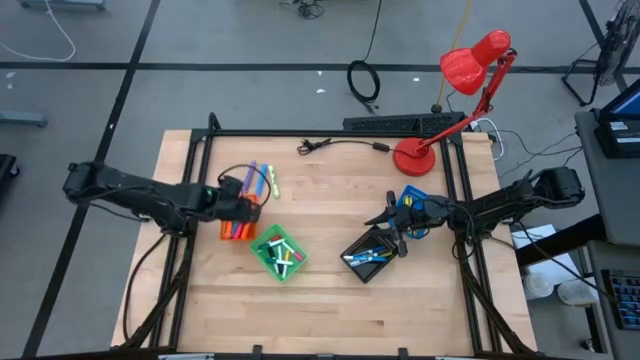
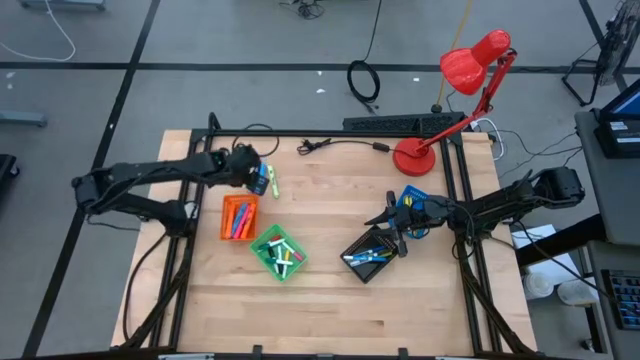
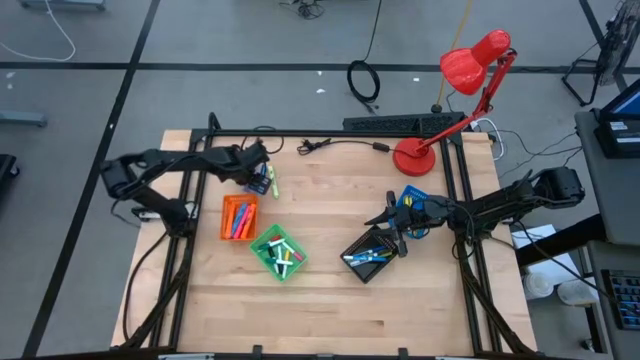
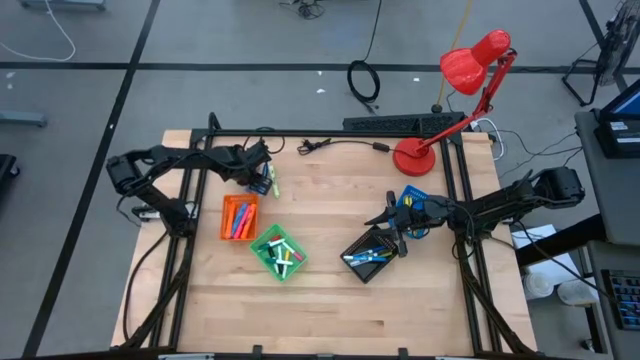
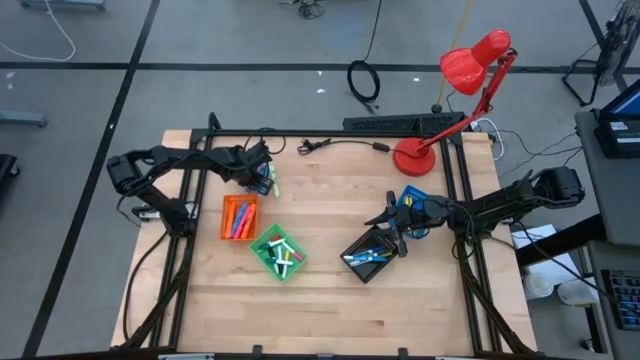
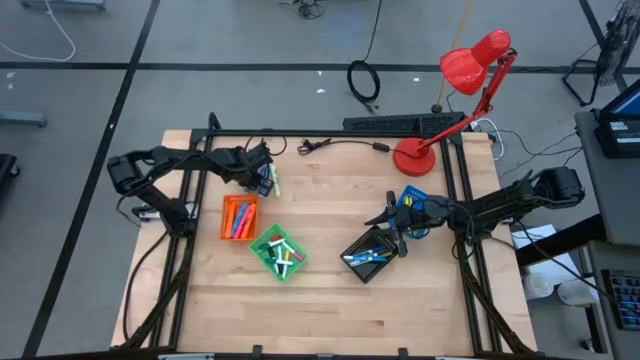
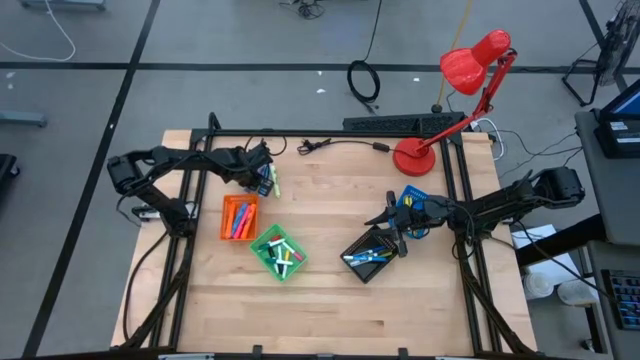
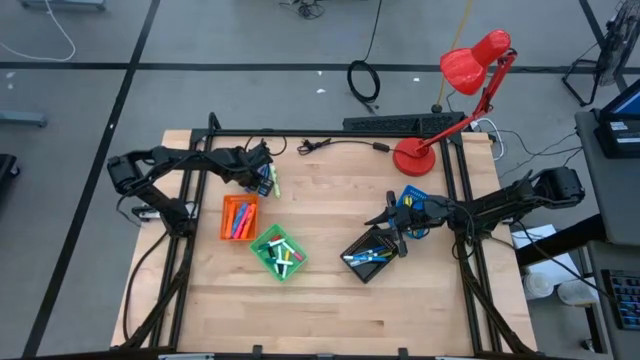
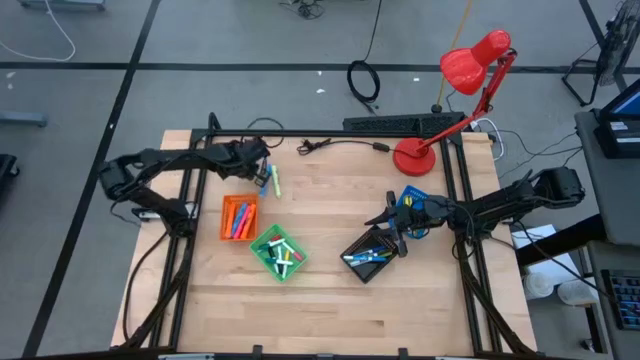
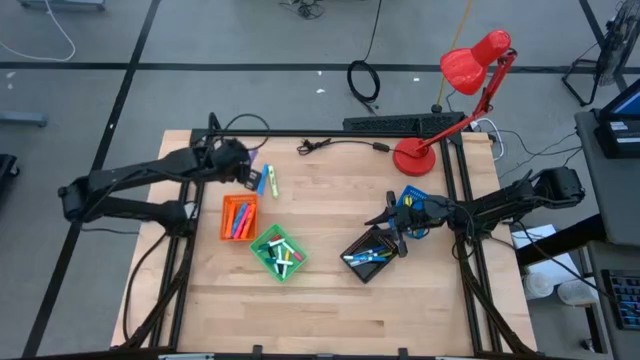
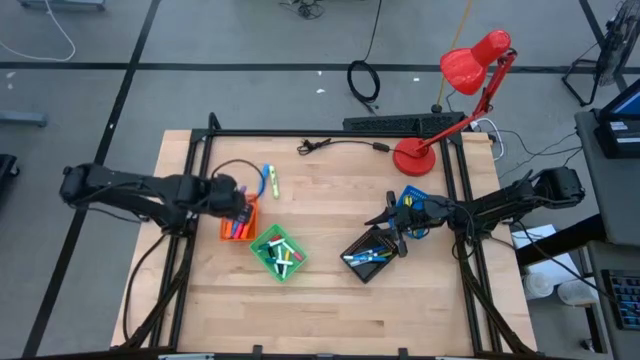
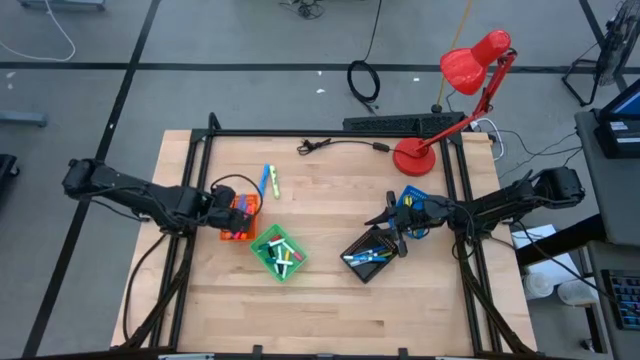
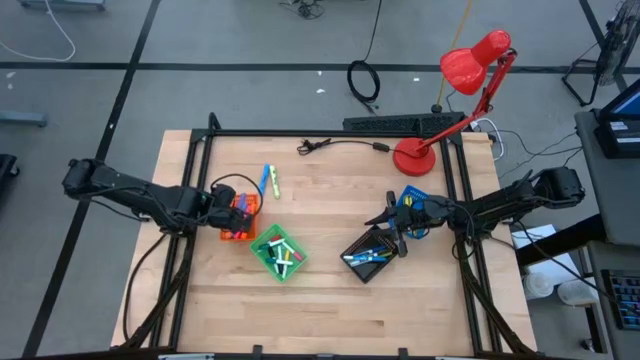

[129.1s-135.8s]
Task: Pick & Place Markers
Put the large purple highlighter pen into the orange basket

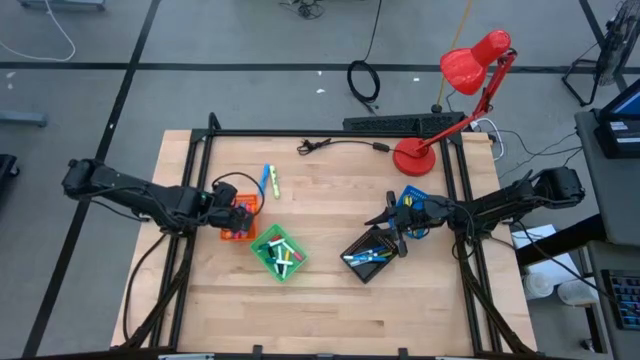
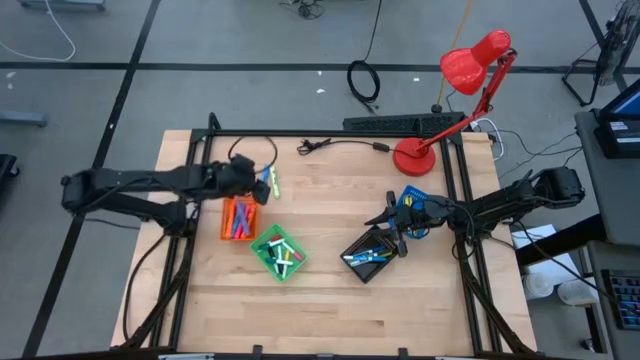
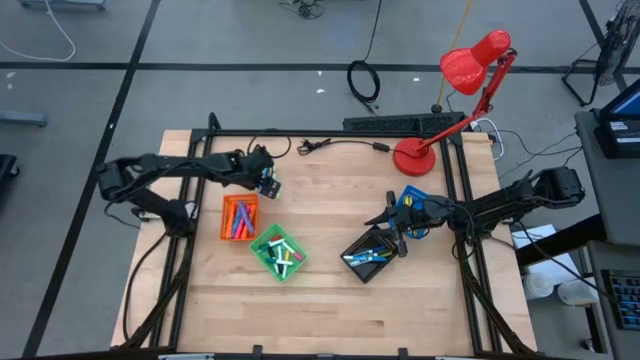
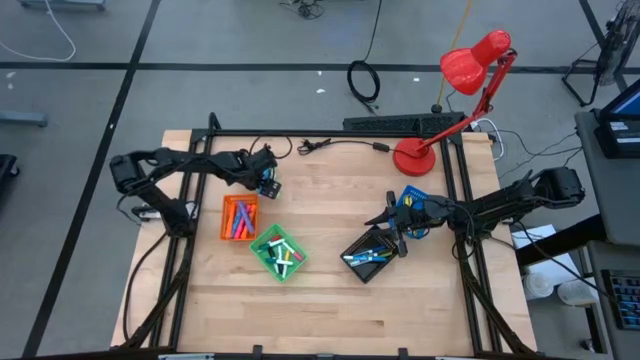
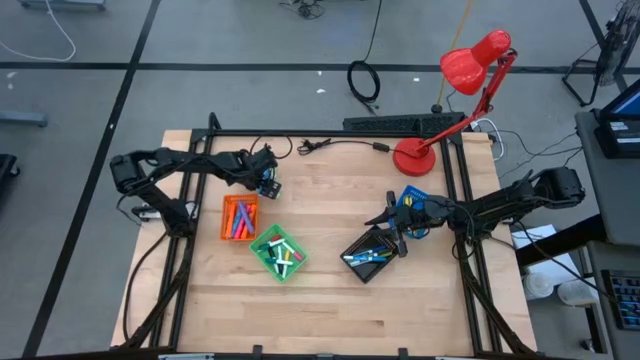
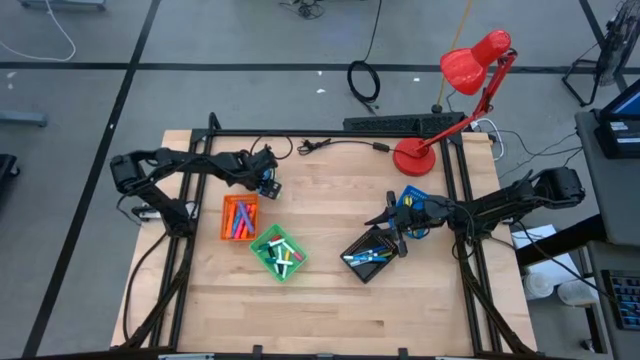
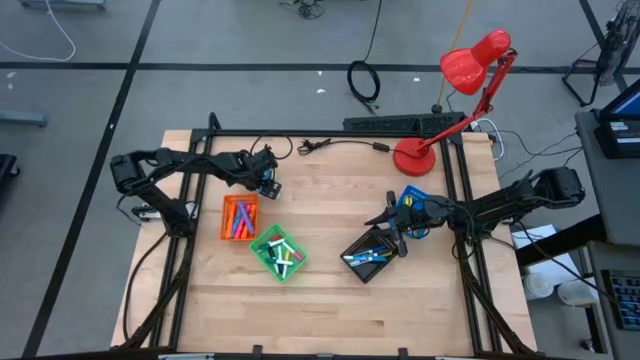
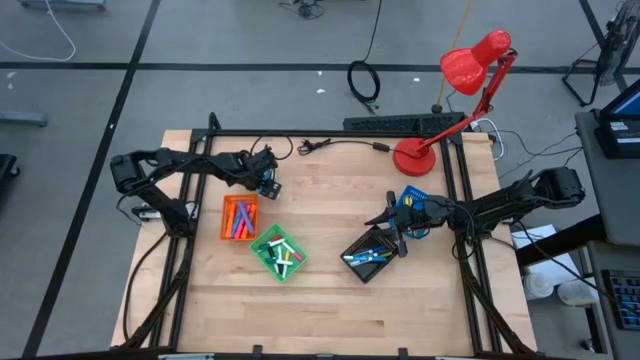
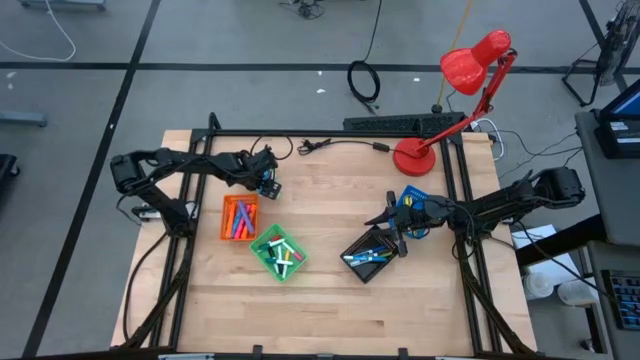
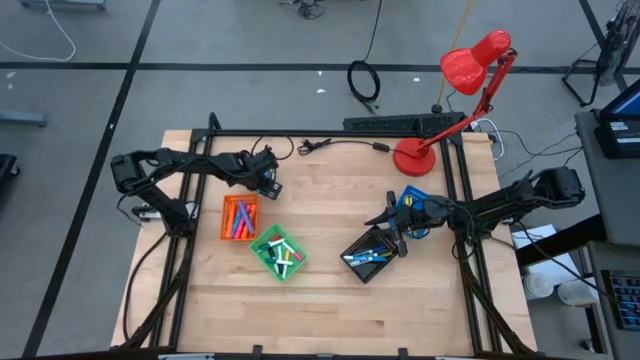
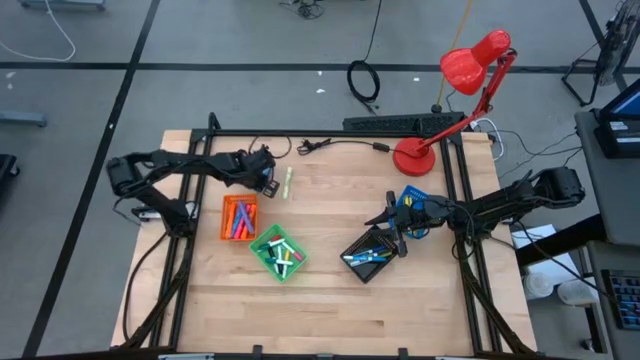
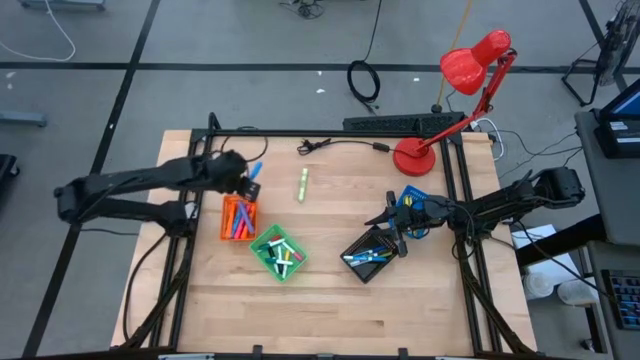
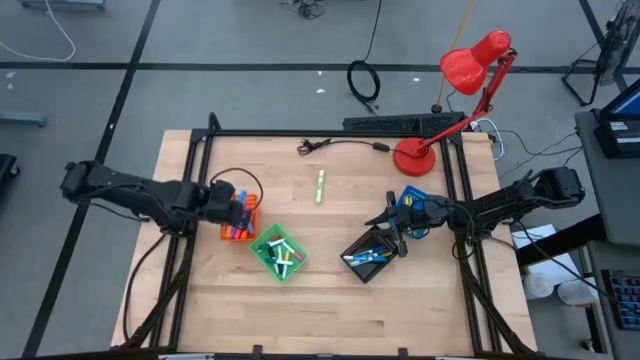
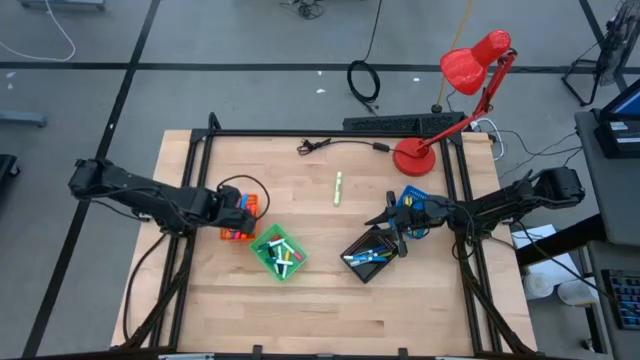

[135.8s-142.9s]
Put the large blue highlighter pen into the orange basket

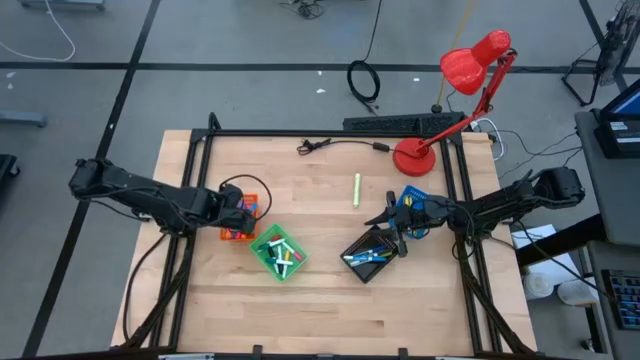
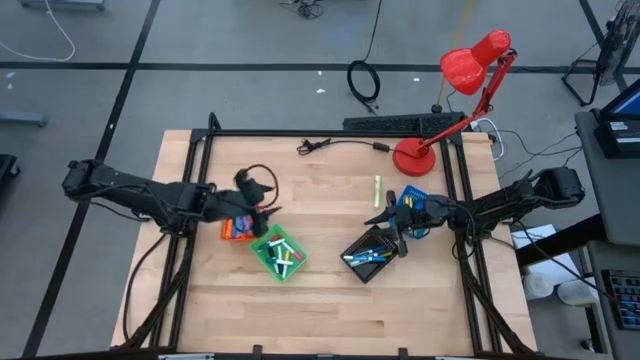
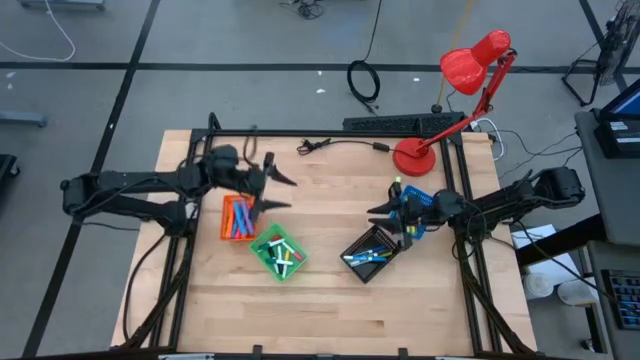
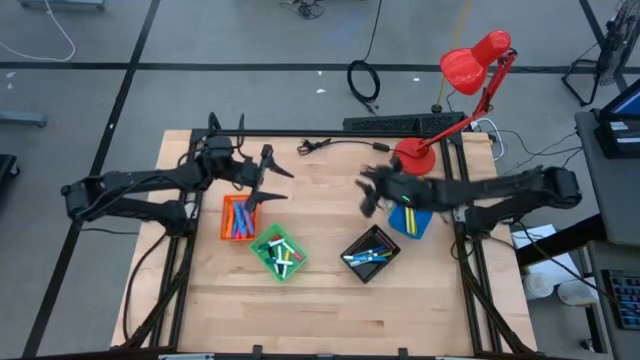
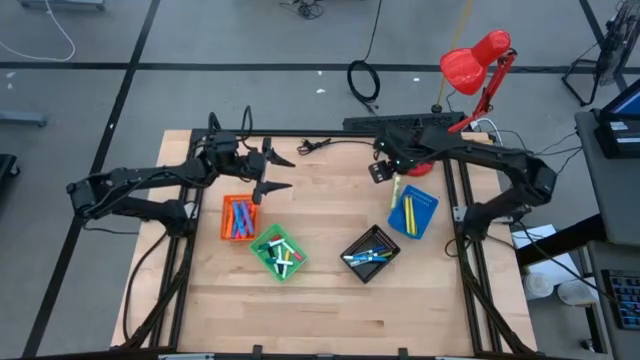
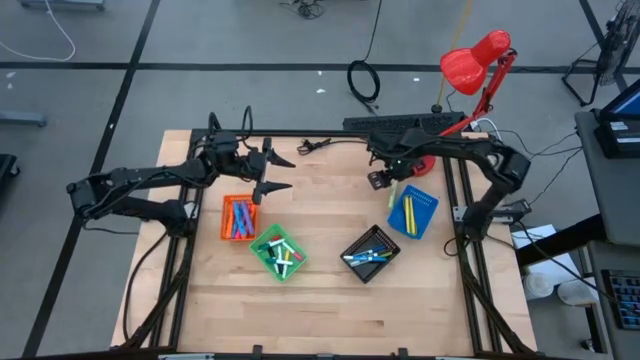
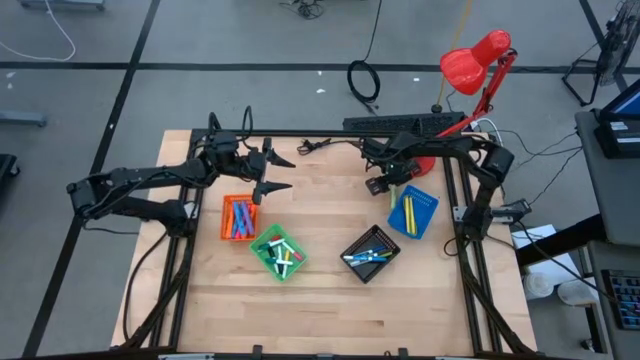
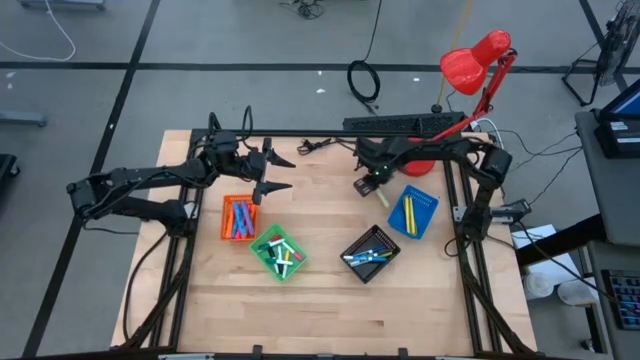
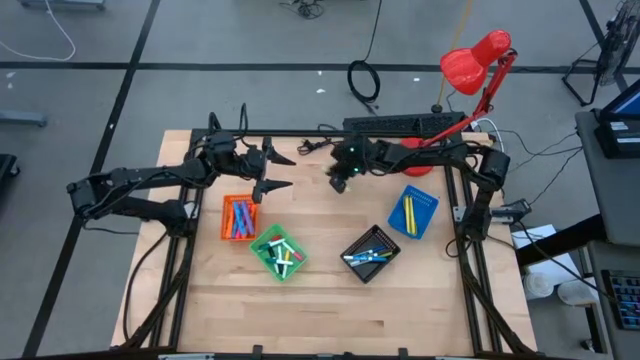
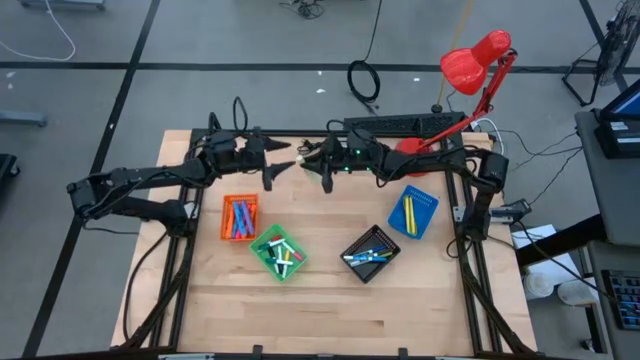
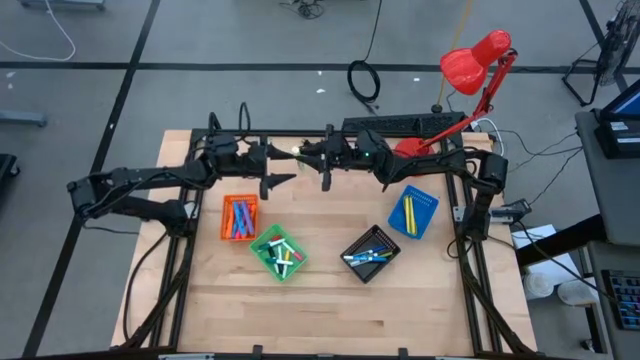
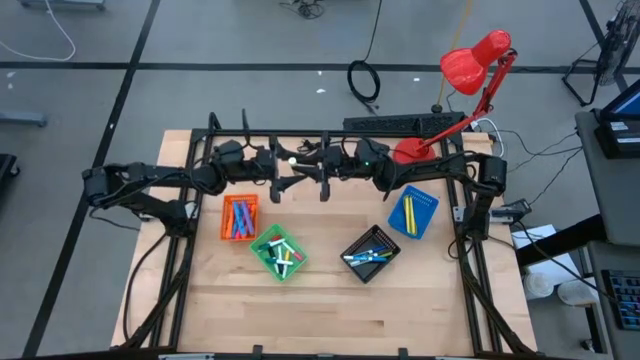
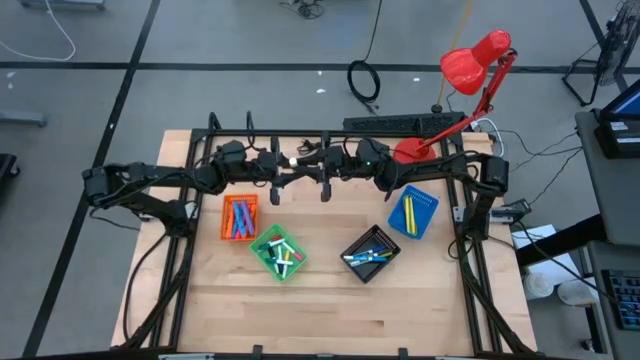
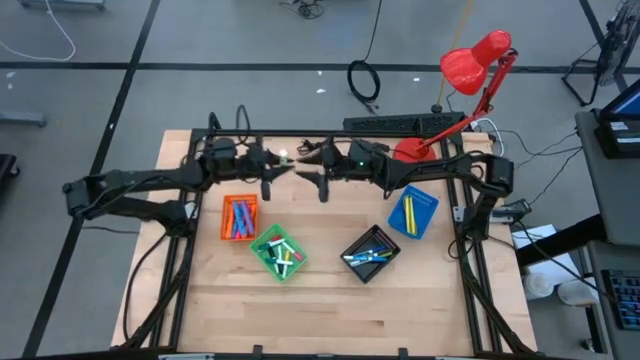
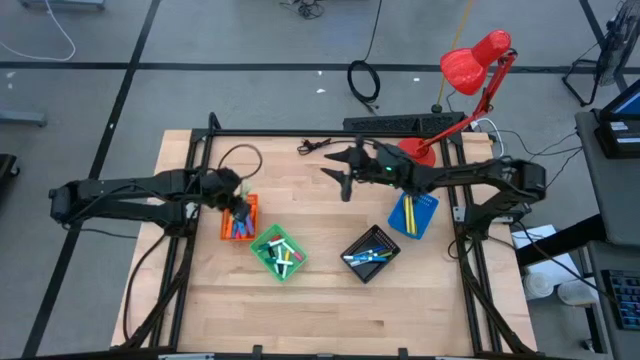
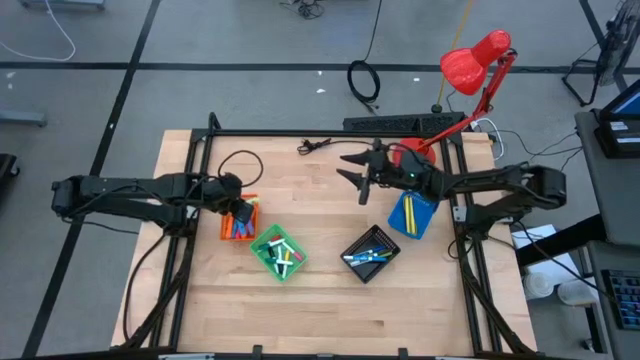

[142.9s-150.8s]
Put the large green highlighter pen into the orange basket
